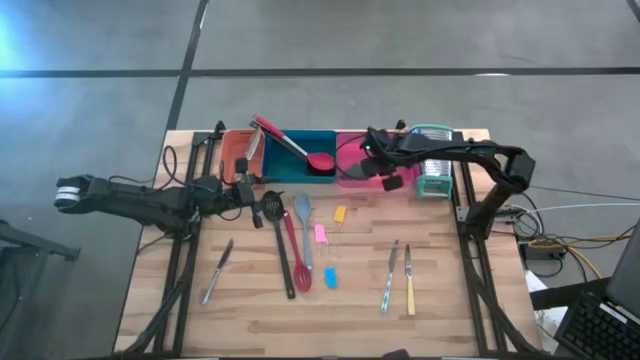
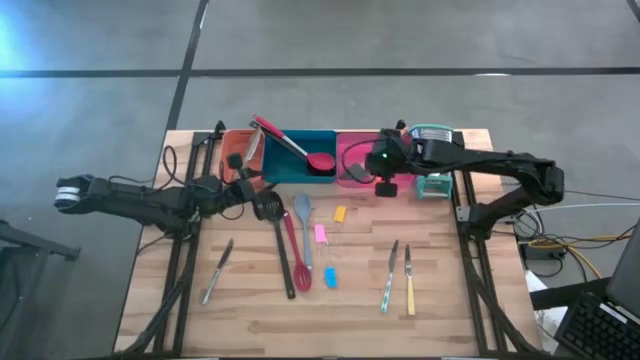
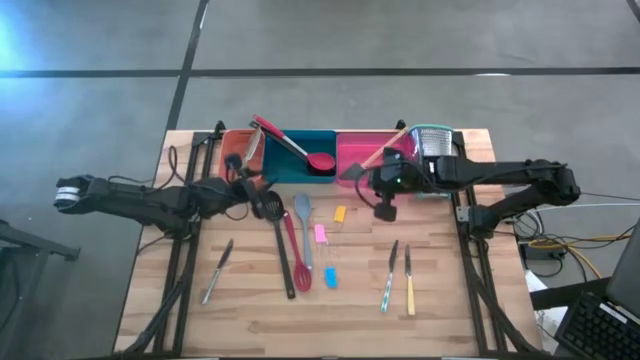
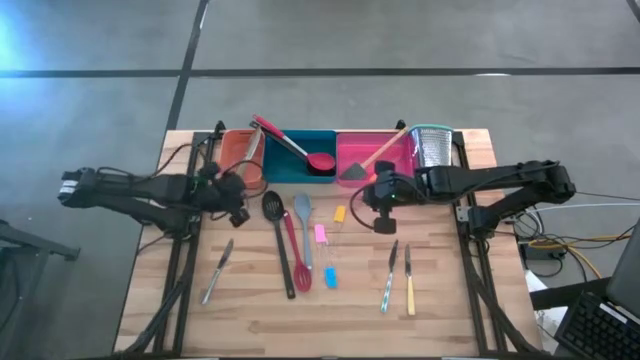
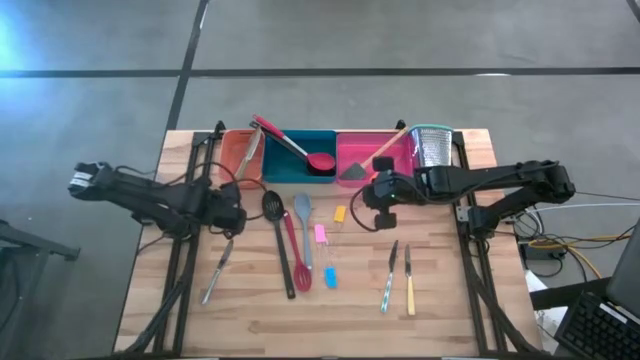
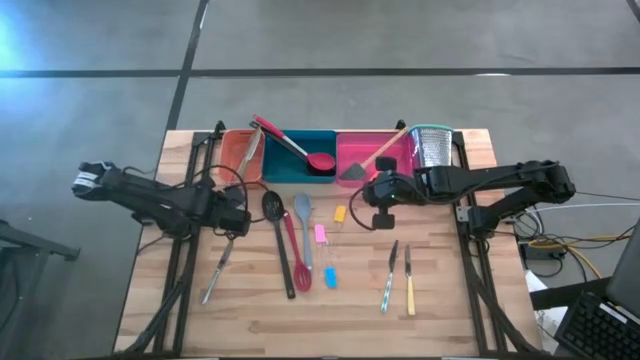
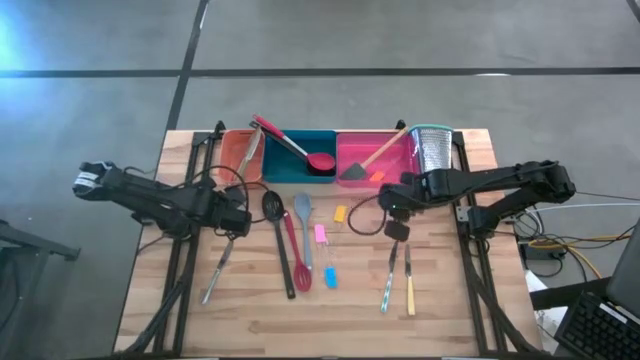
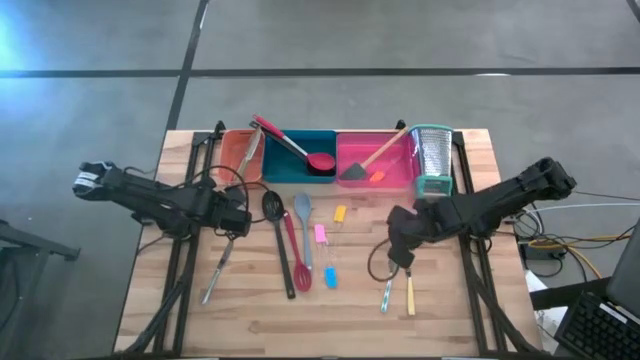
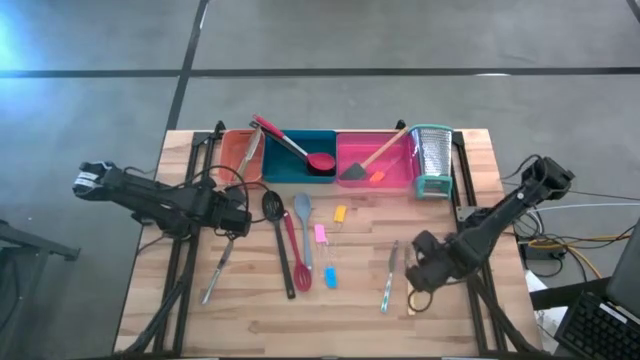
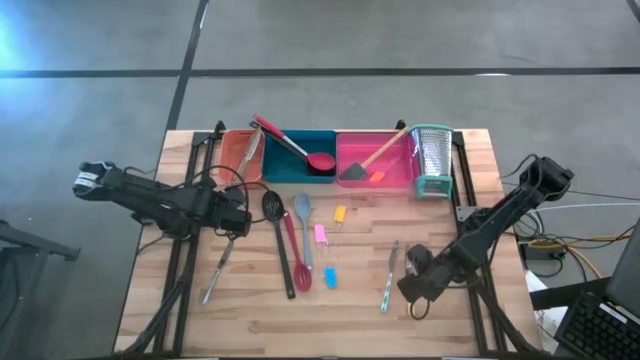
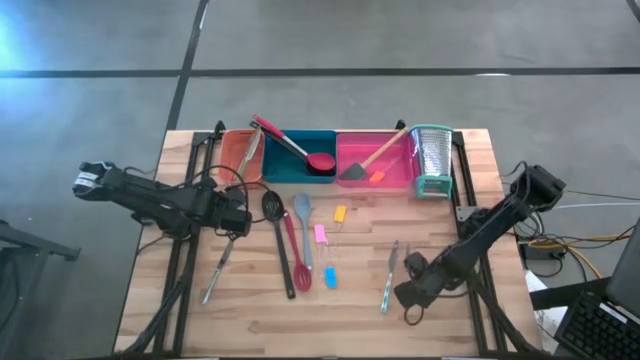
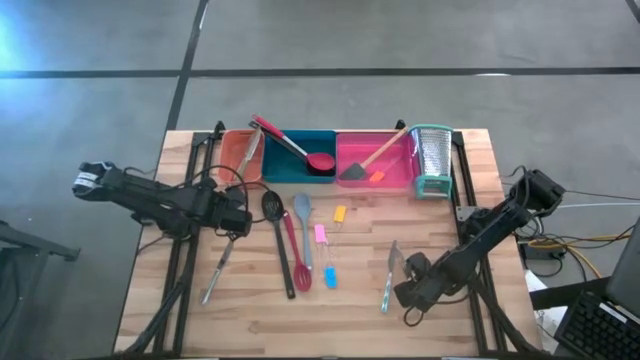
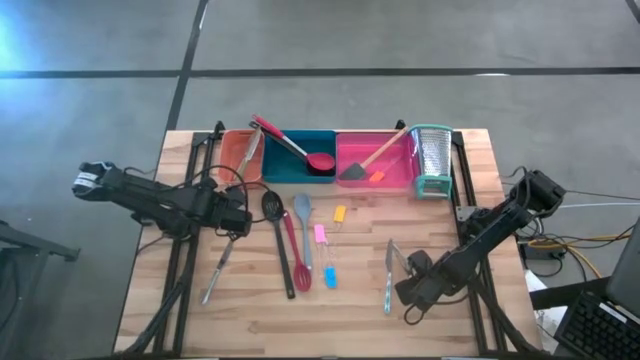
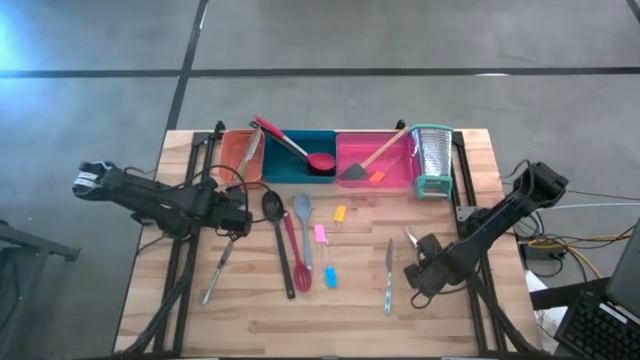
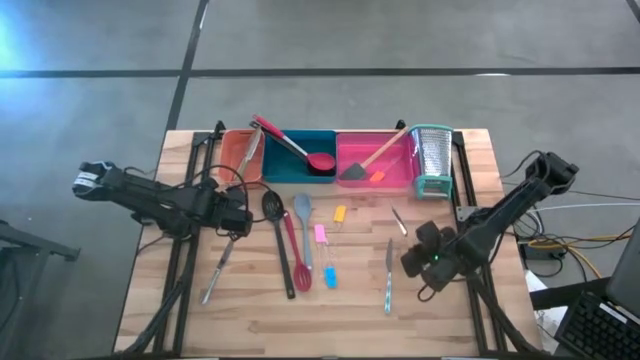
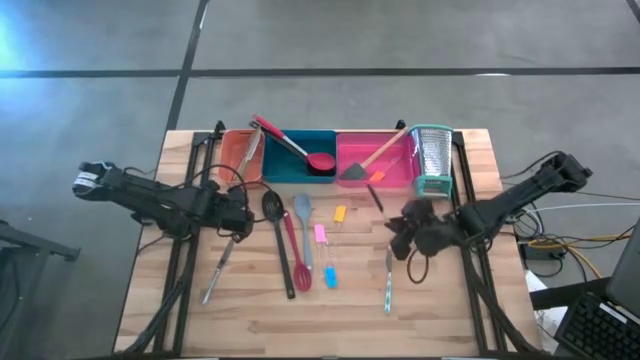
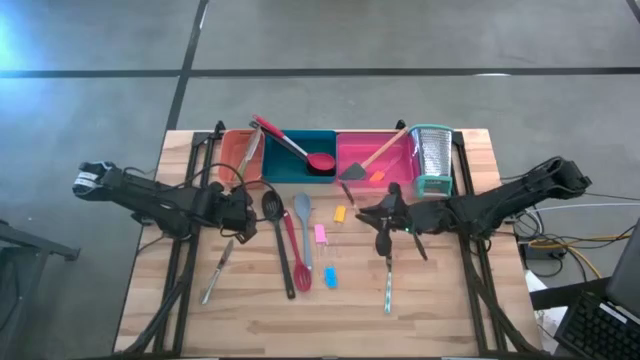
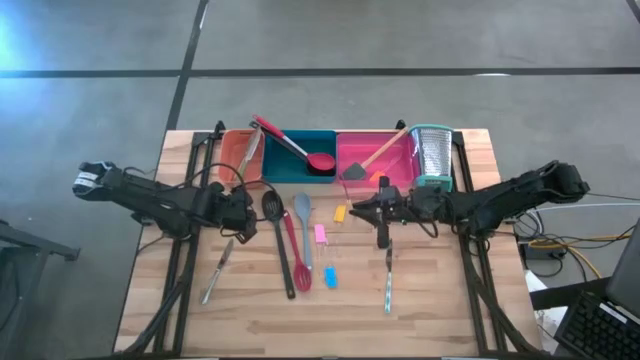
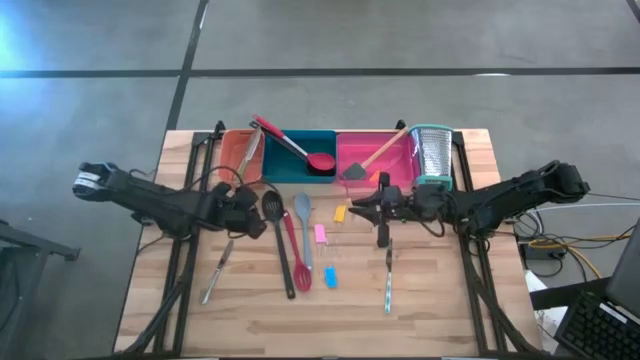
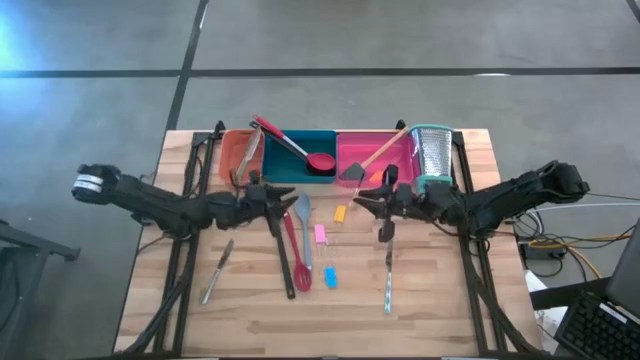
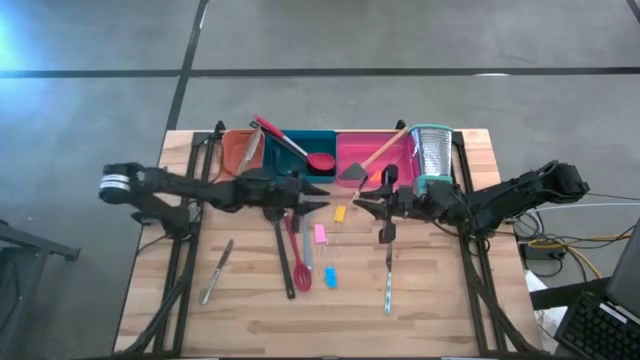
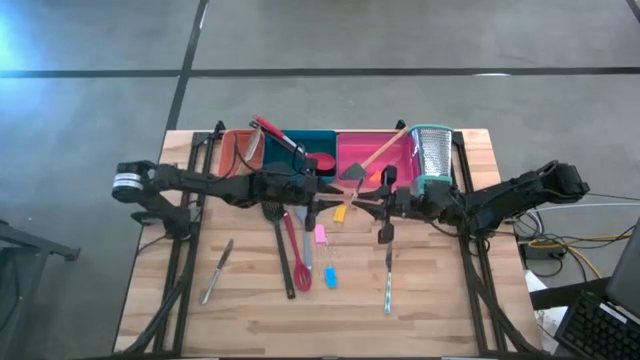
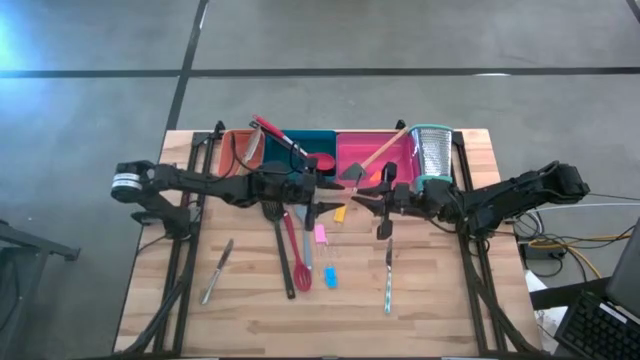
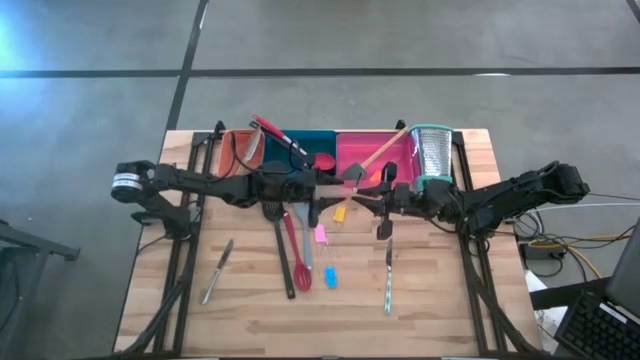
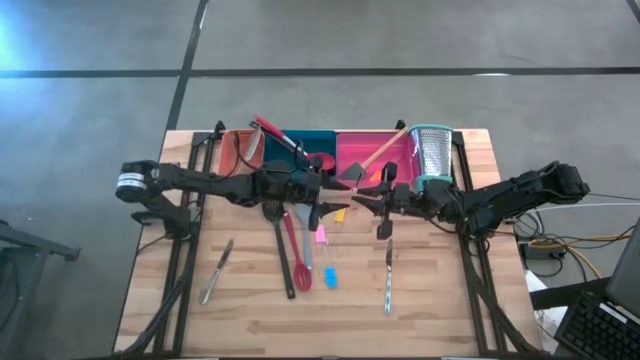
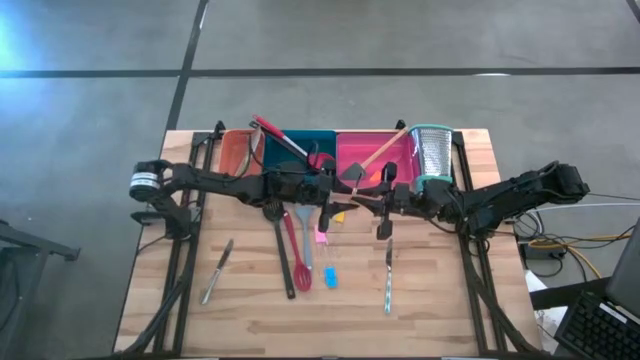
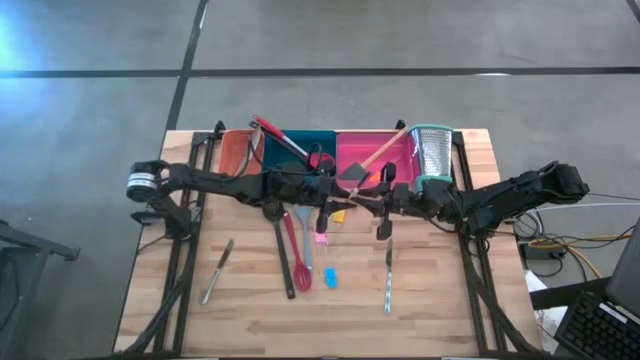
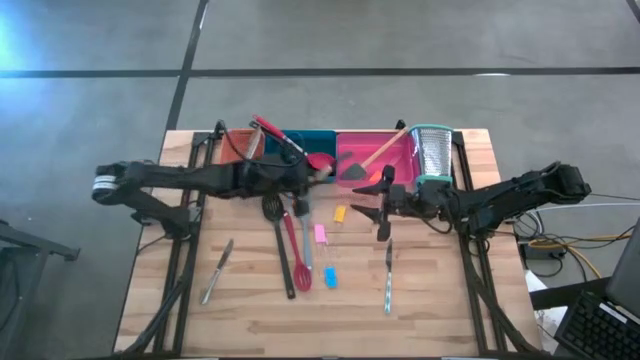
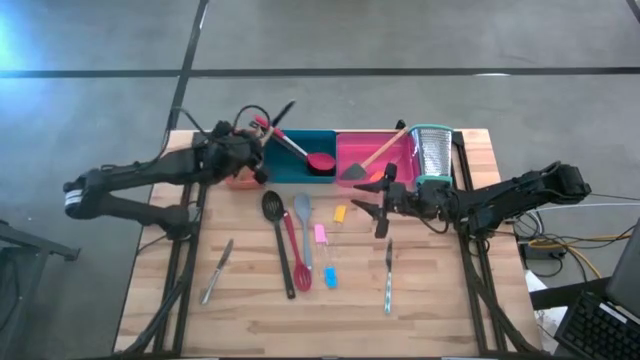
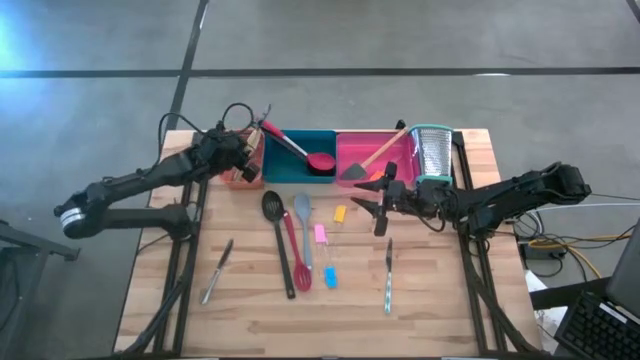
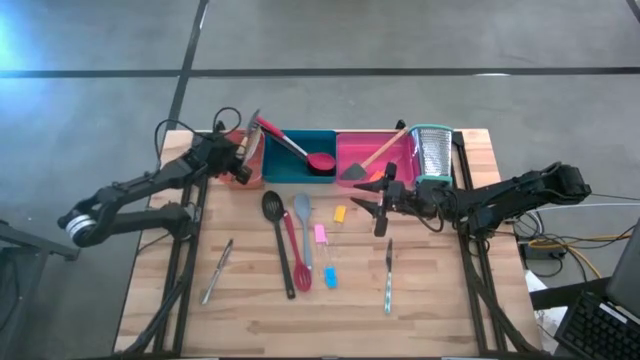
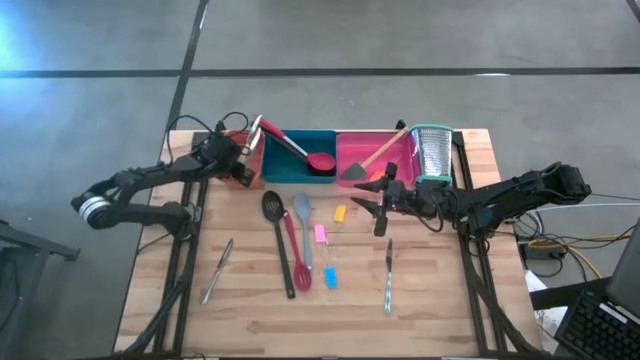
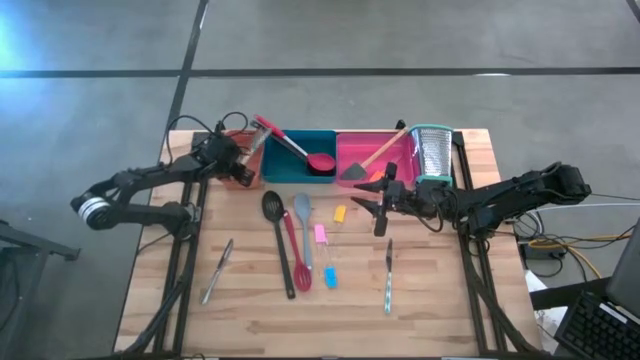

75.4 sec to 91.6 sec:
Task: Pick & Place Kitchen Items
Put the yellow knife into the orange bin

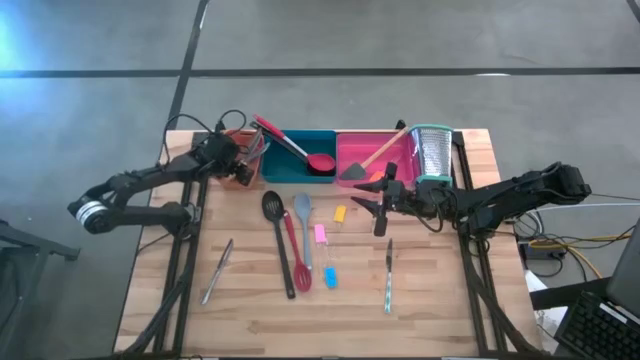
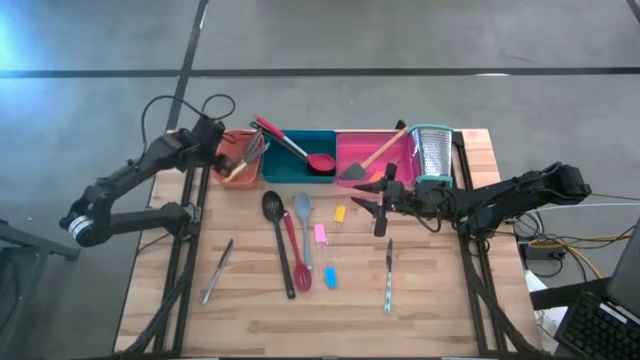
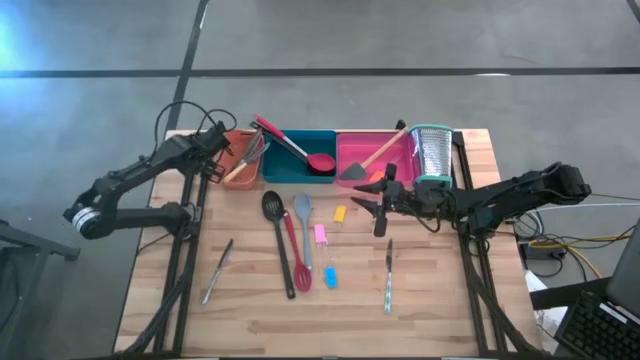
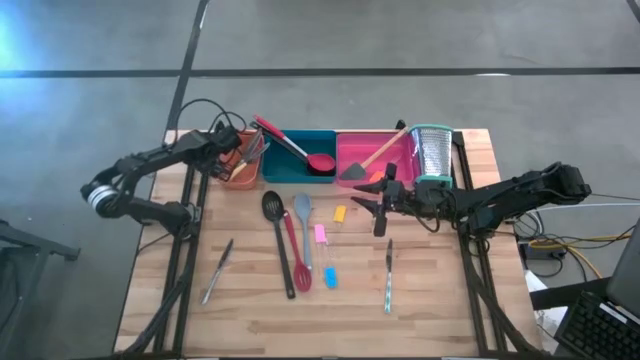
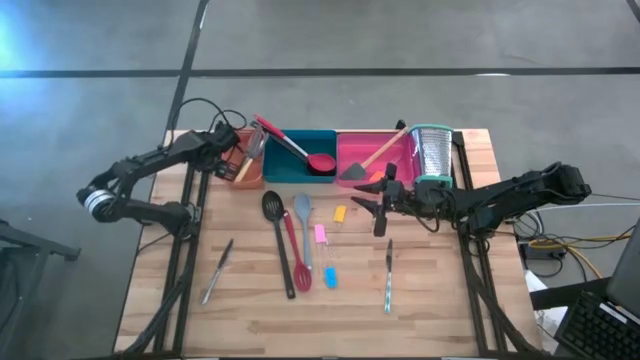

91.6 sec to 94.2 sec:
Adjust the orange bin on the table

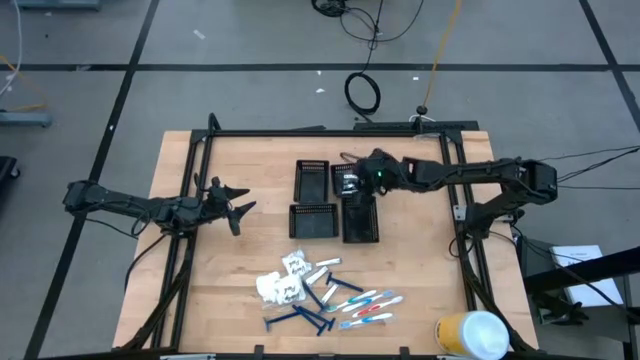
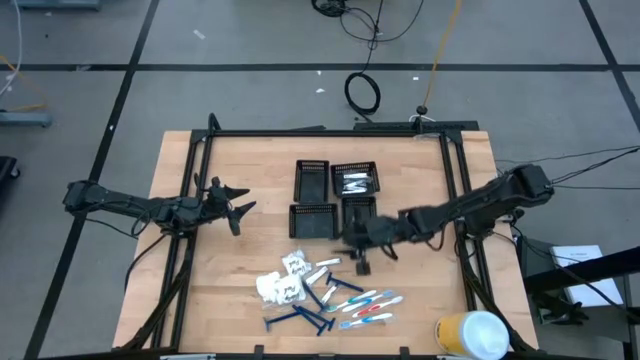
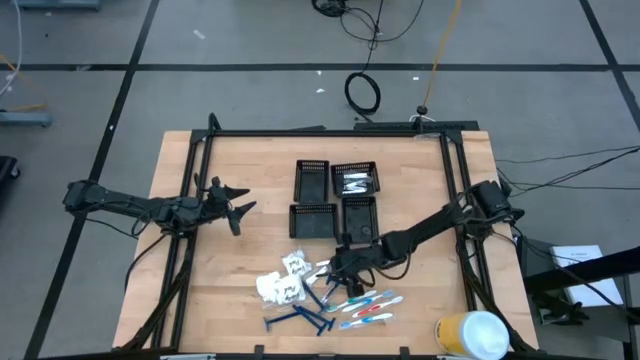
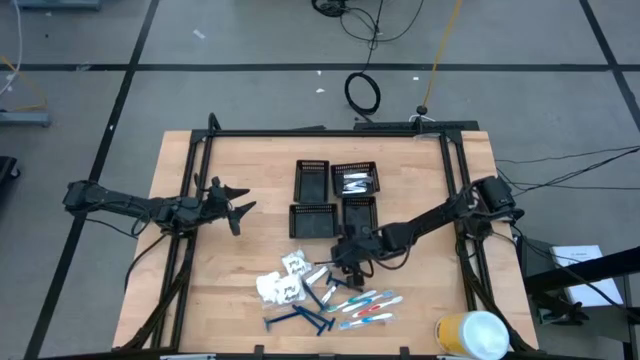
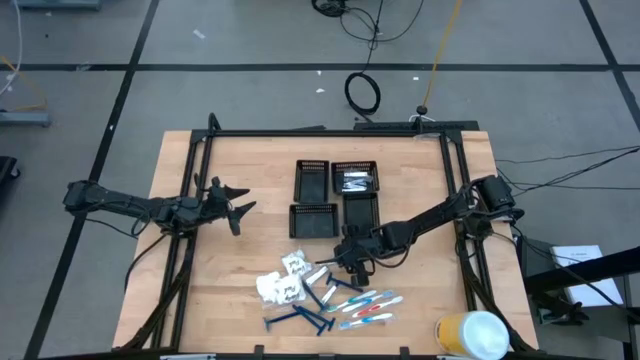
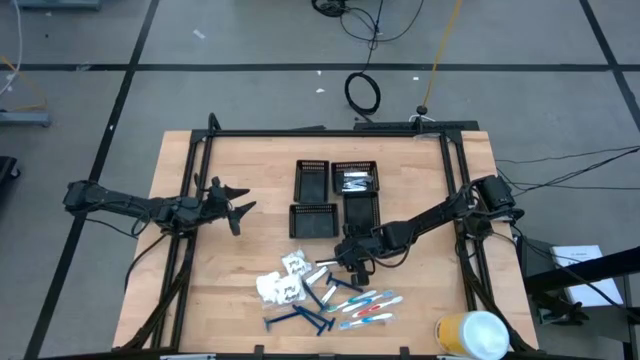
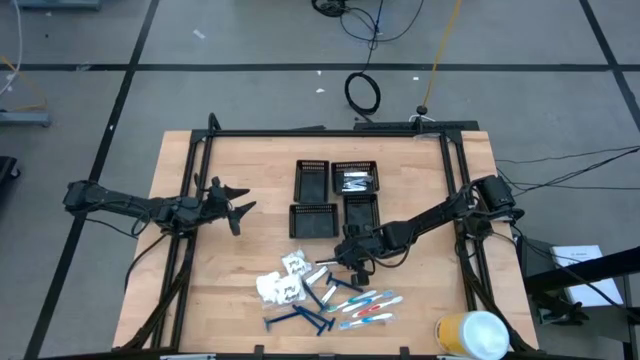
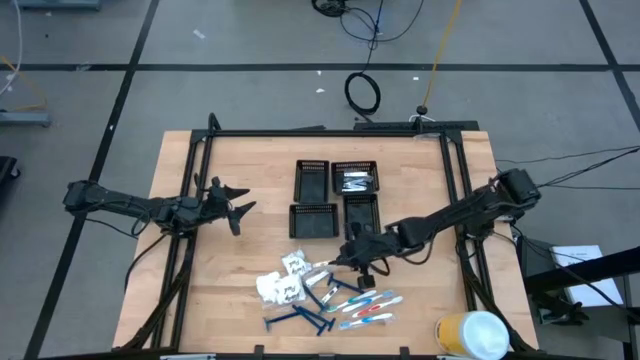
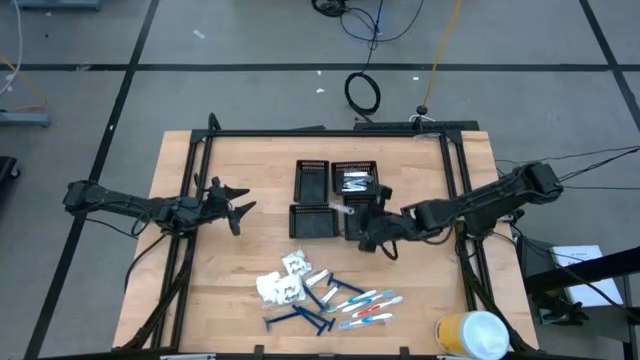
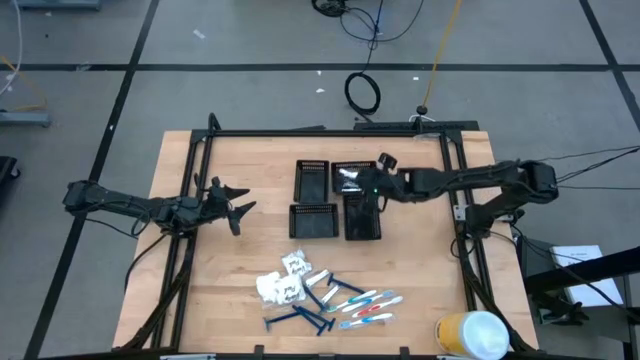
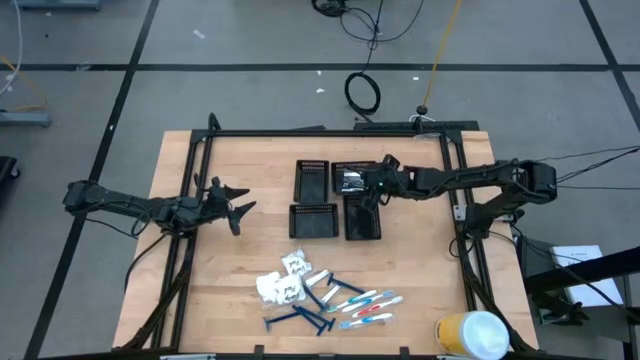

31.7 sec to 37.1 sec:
Task: Pick & Place Travel size toiletries
Put the silver nail cutter into the top right black bin
